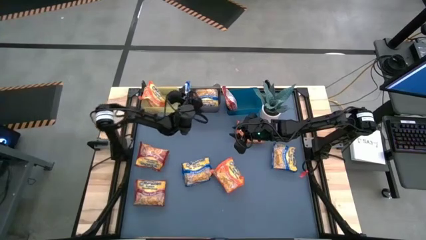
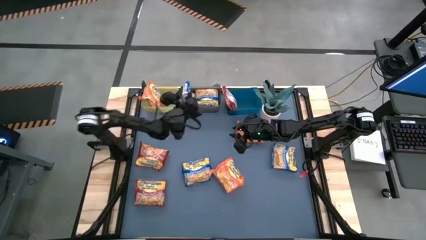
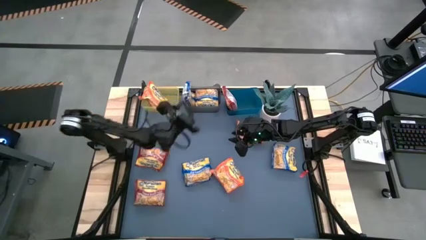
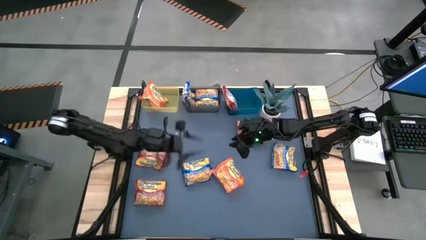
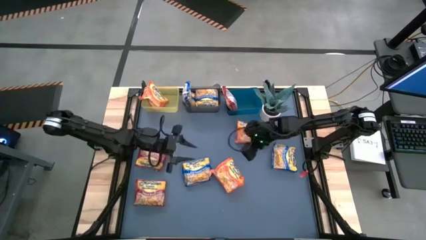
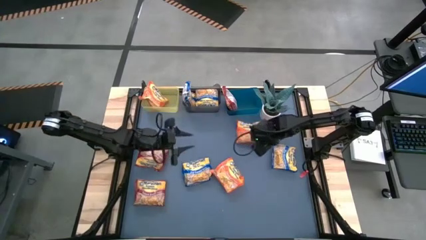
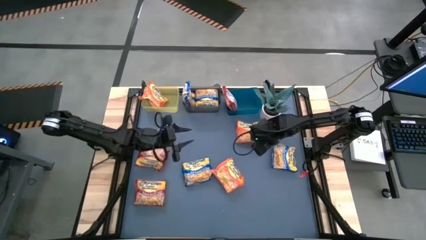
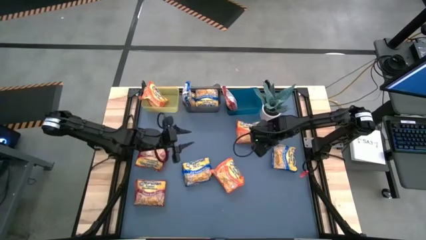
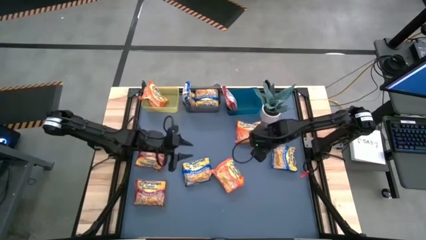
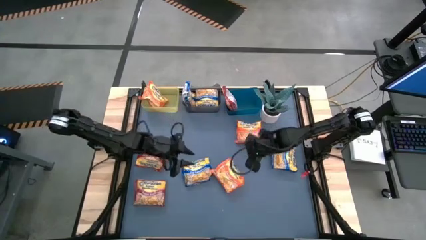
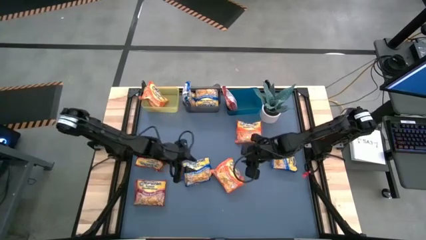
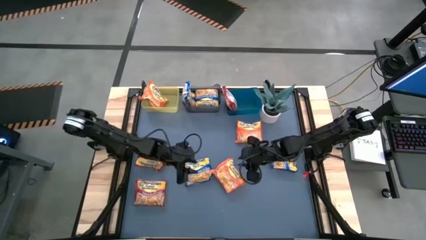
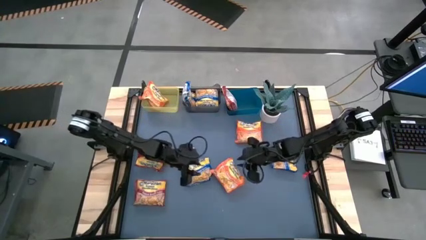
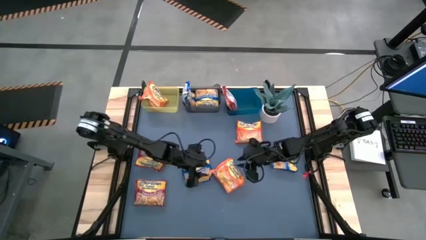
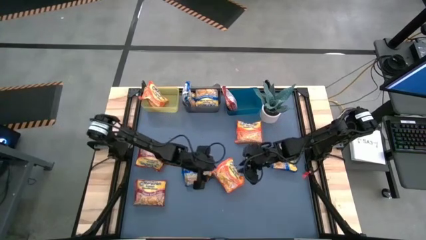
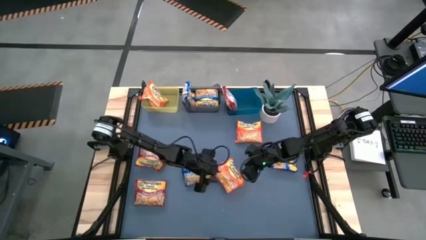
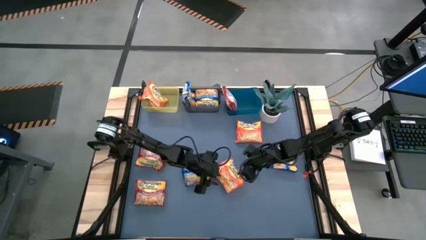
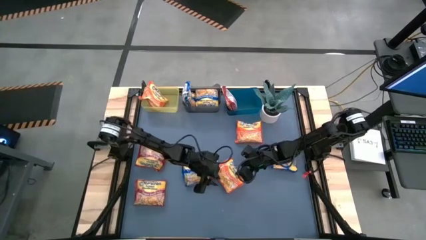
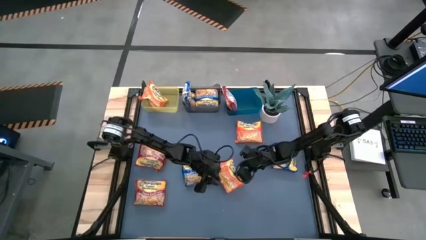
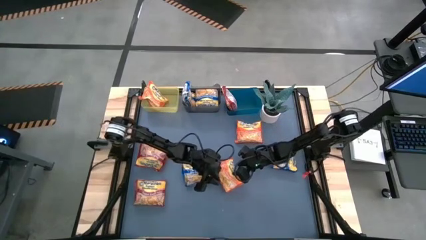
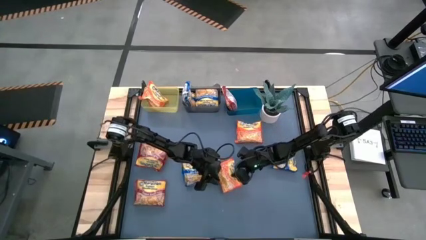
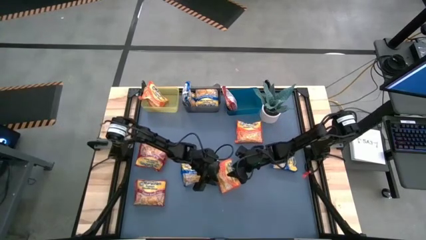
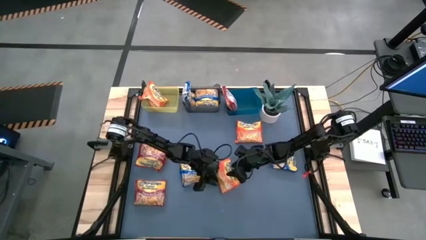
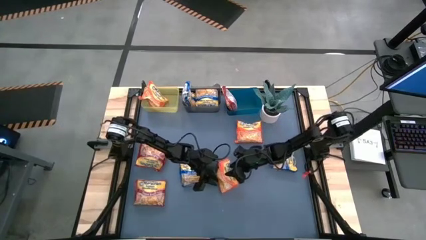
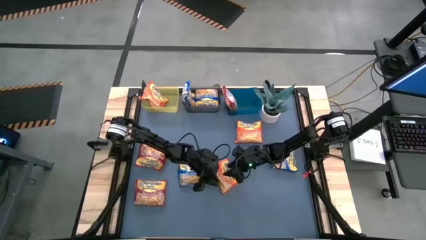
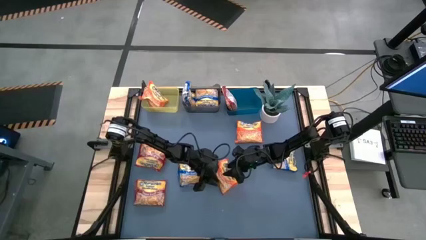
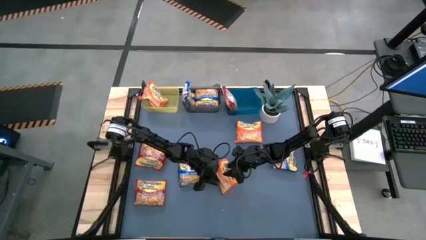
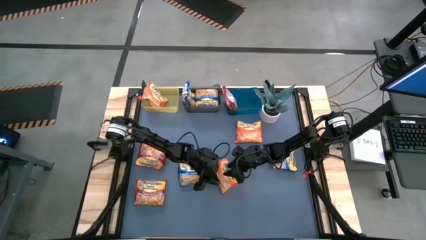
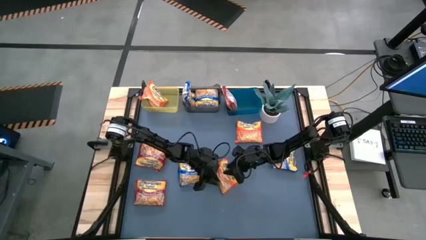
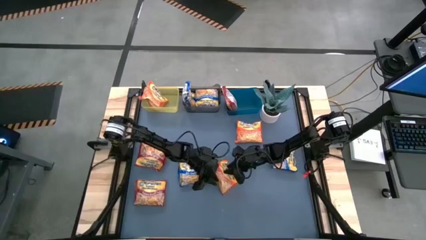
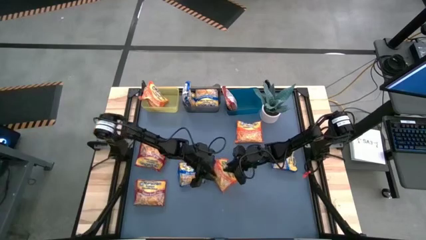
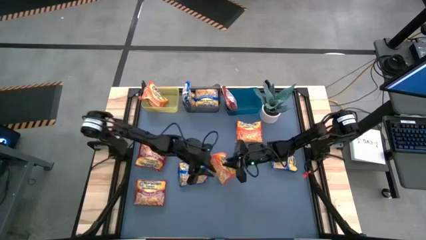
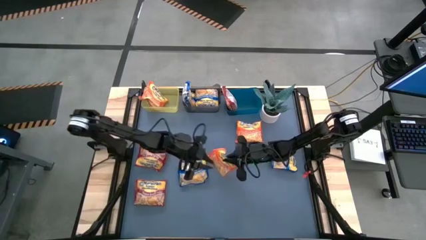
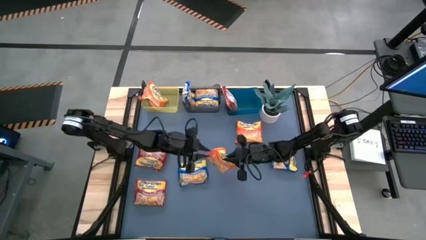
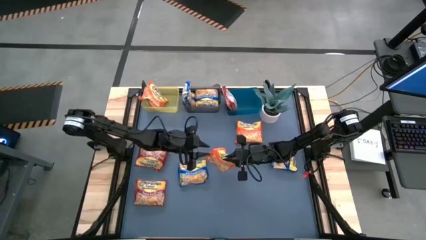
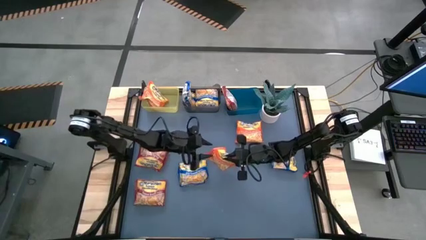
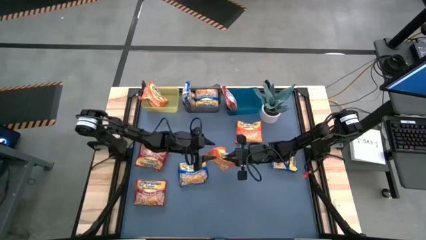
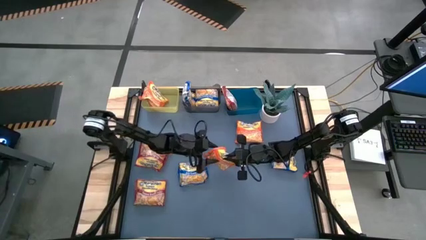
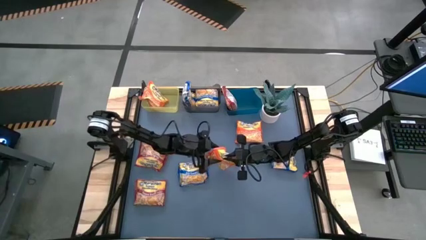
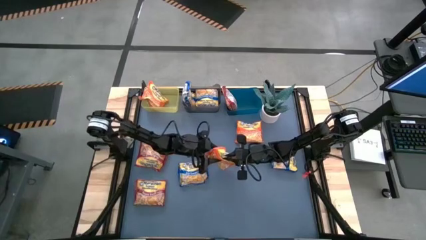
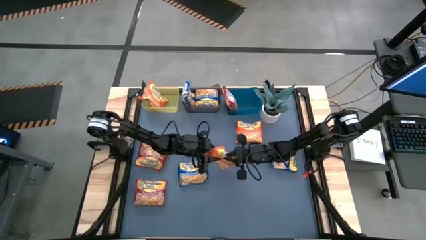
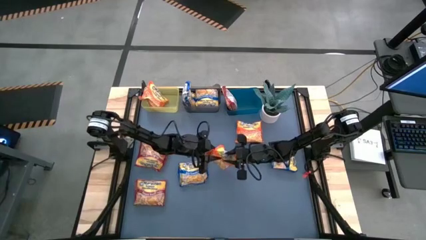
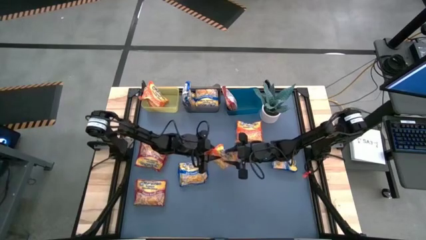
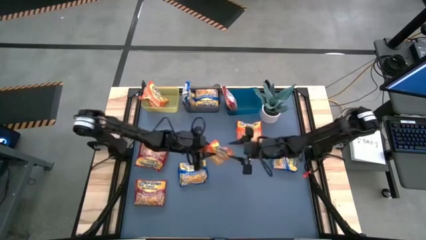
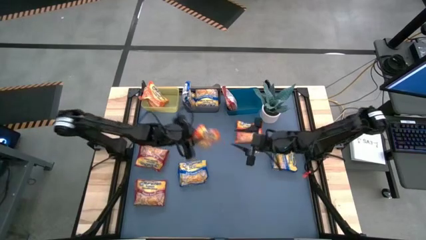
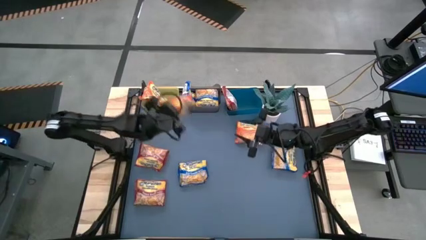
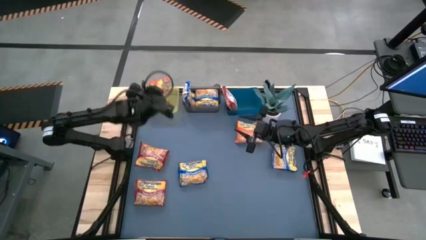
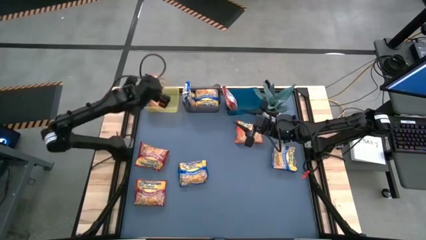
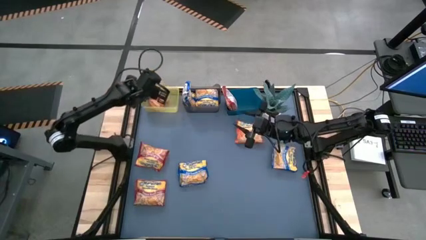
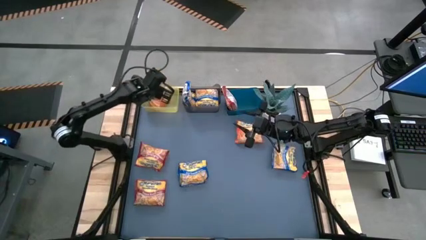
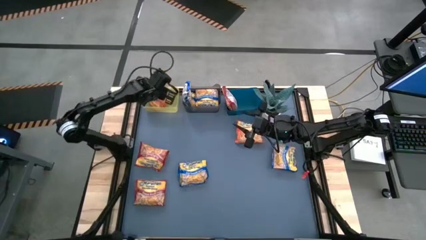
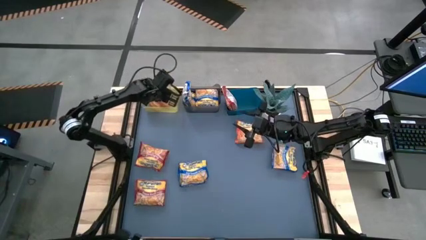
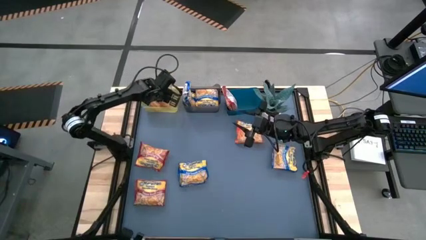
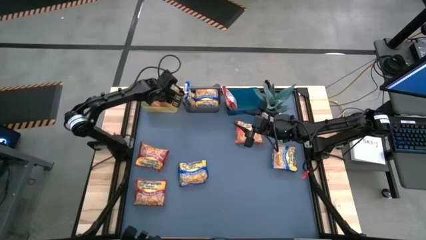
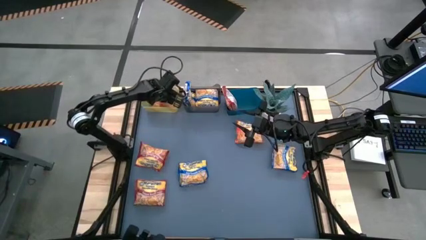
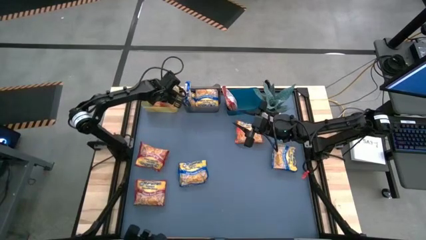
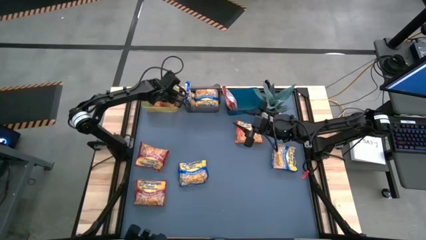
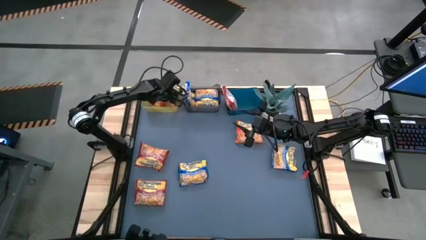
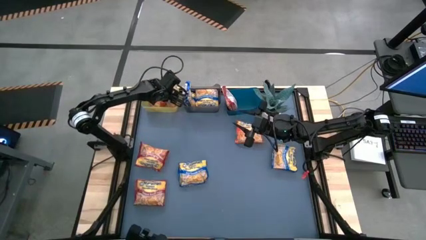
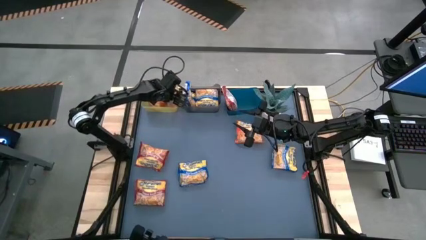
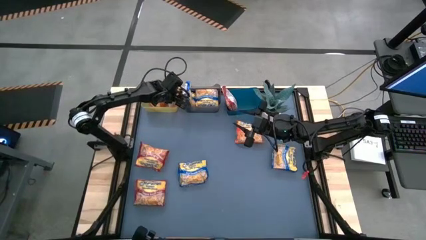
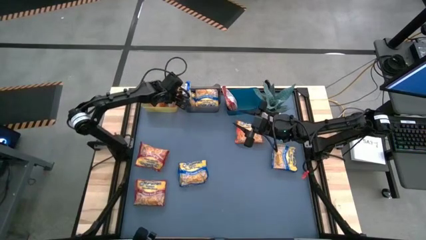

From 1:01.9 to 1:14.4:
Task: Sort Maruchan noodles
Put the orange noodle pack into the yellow bin
